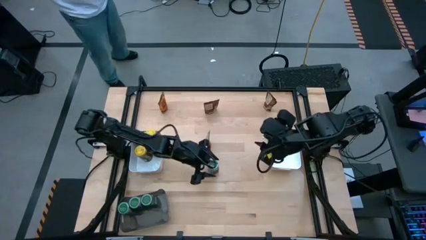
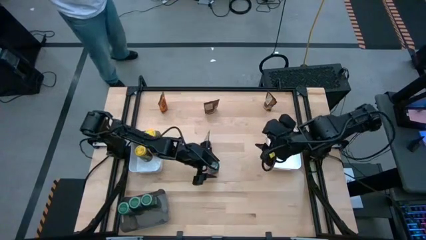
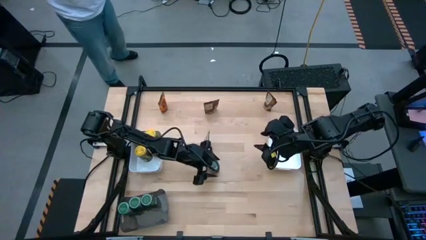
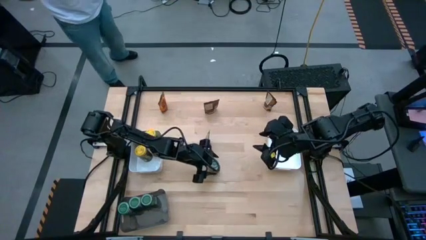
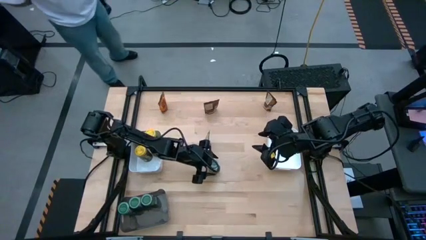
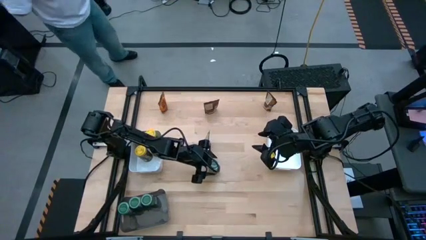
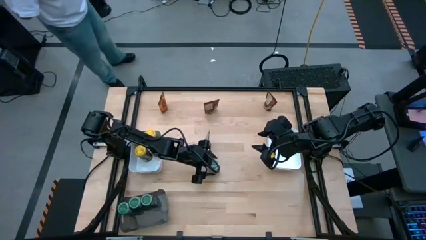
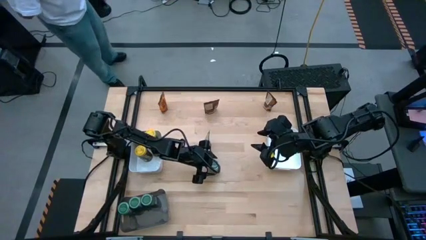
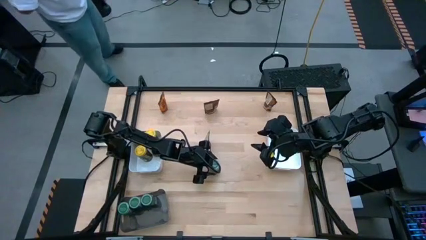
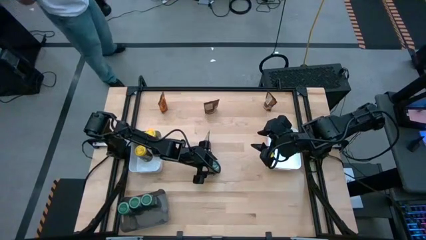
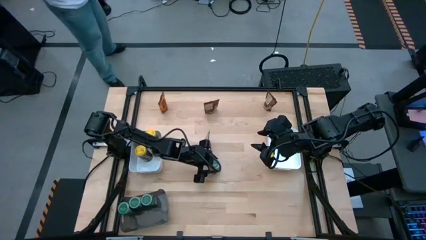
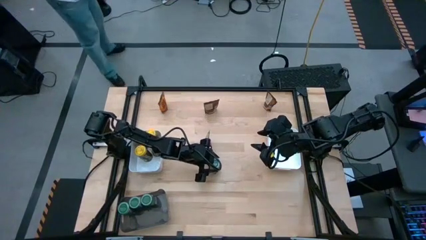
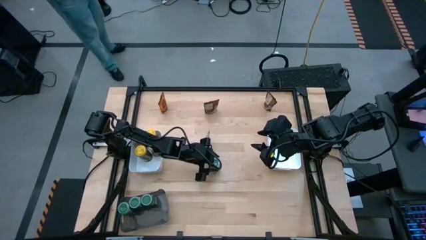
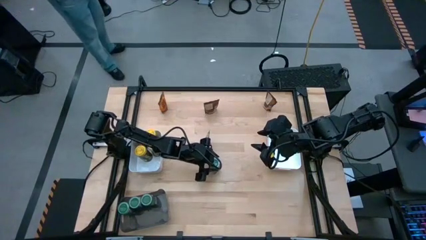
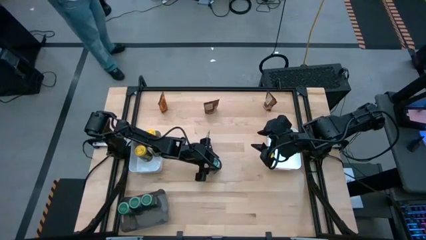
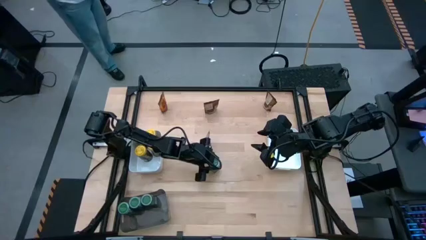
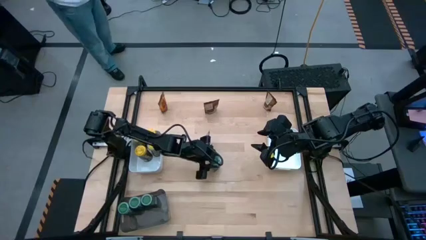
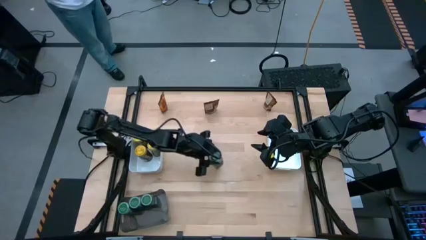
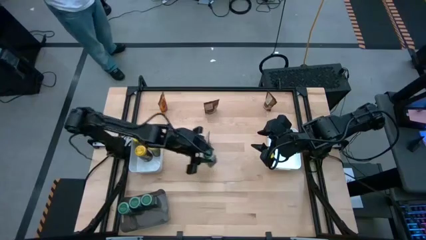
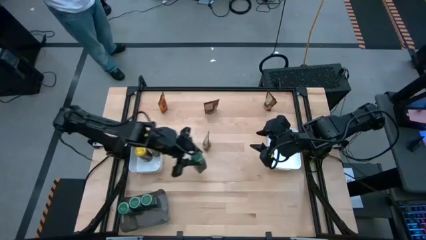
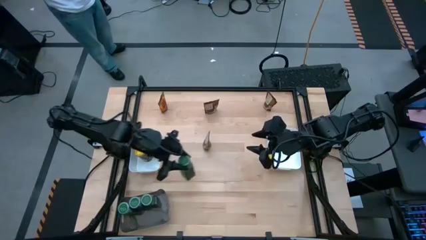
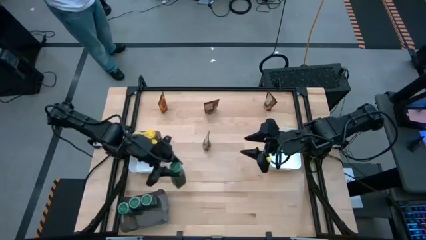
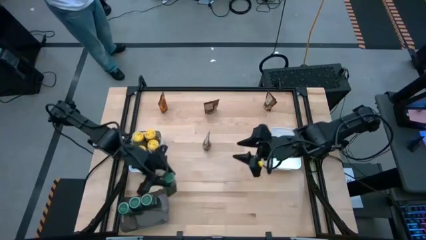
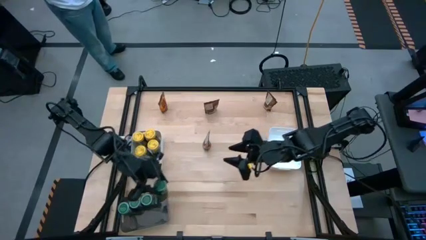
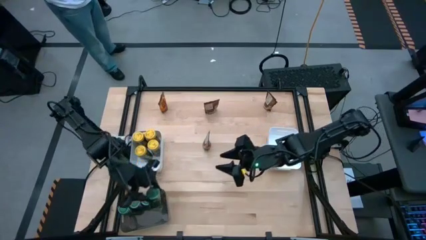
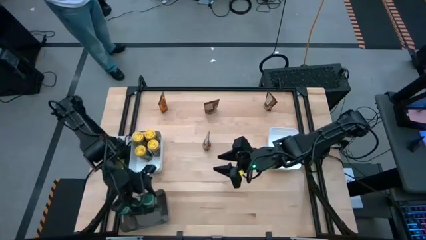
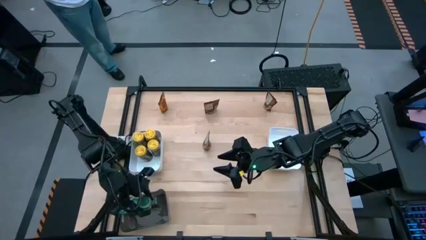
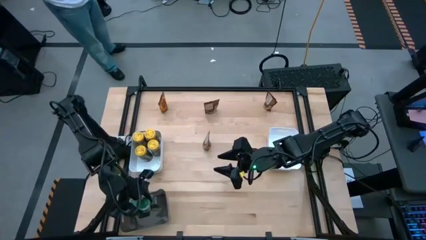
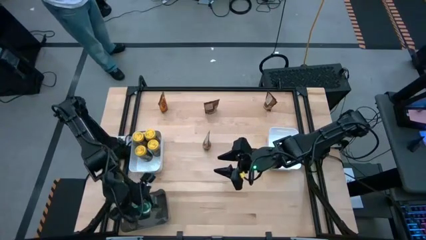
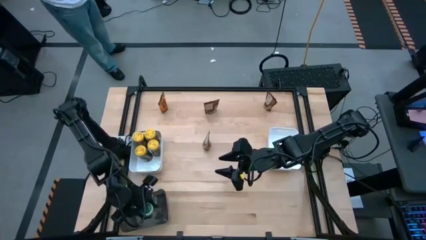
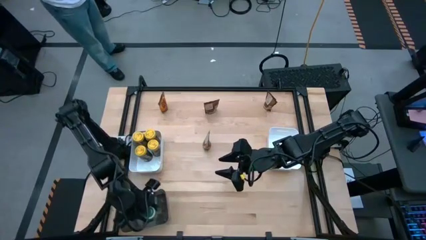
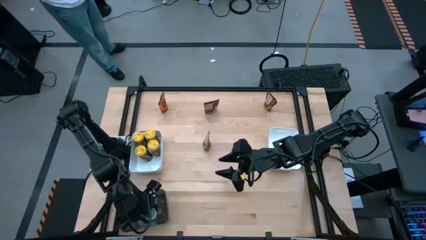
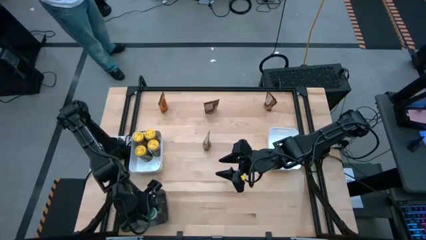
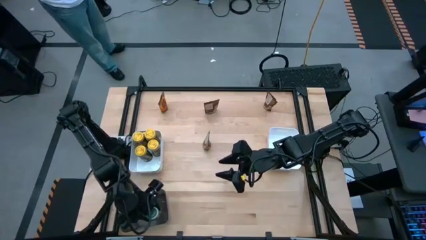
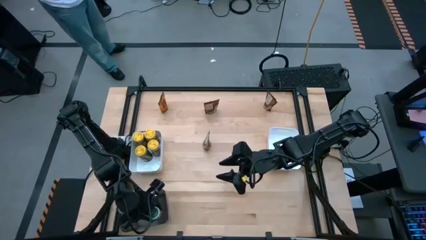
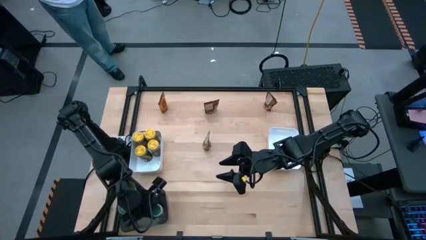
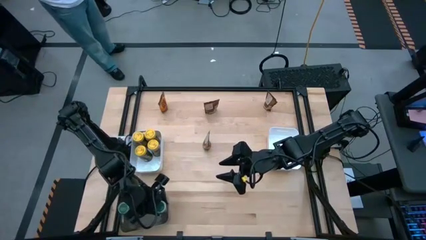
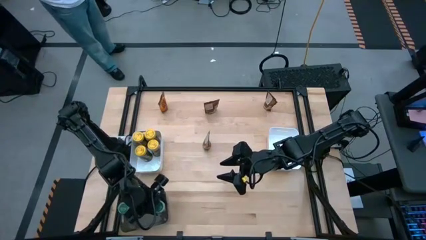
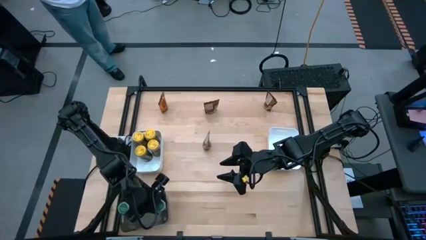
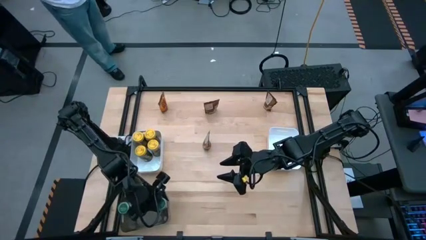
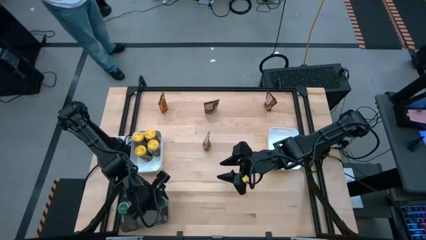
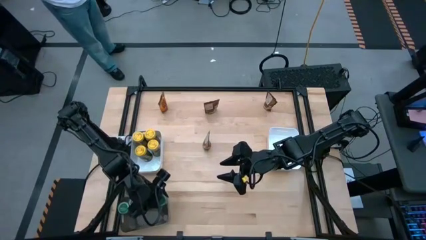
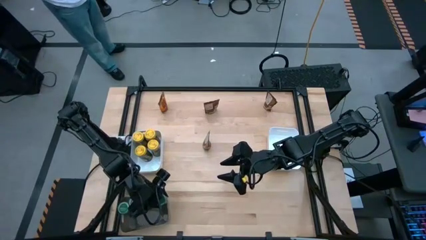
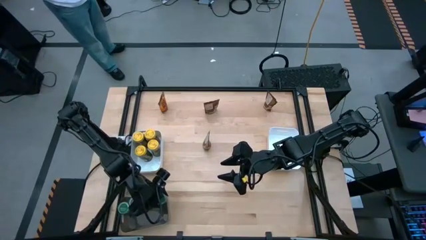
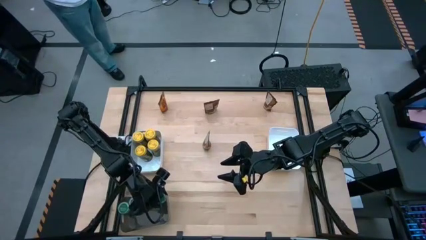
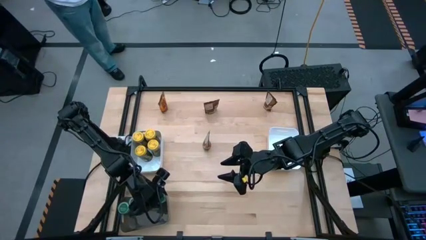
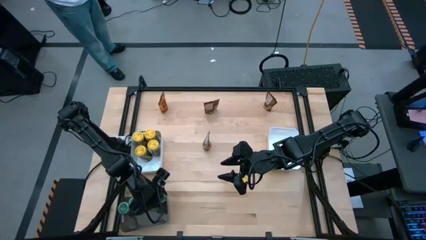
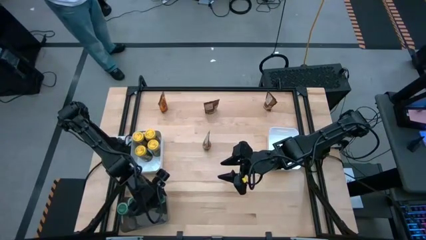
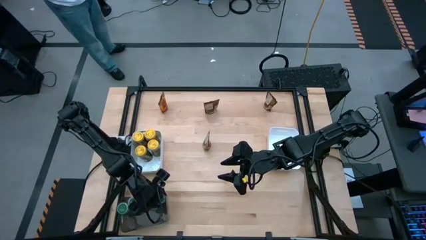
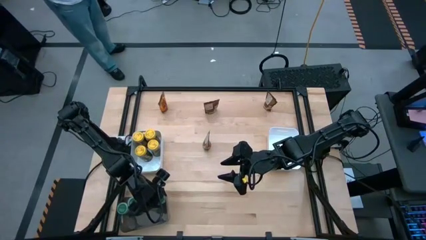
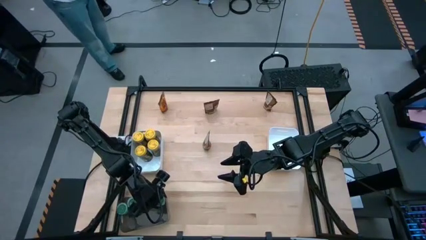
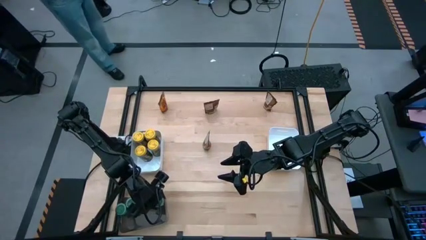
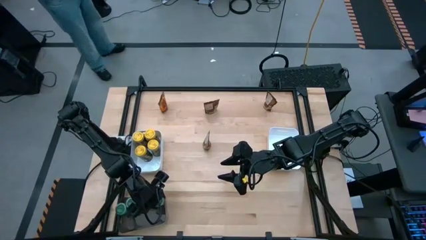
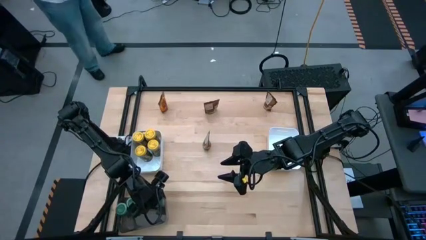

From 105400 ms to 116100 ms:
Task: Sort spices by type
Put the green seasoning bottle into the black bin

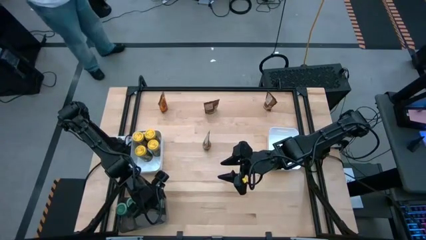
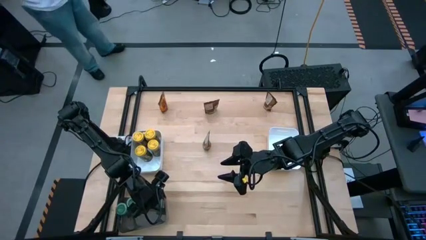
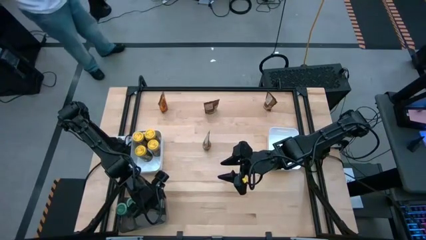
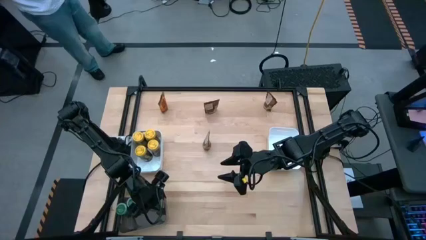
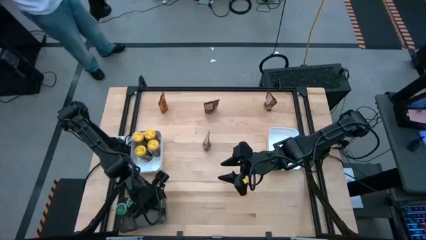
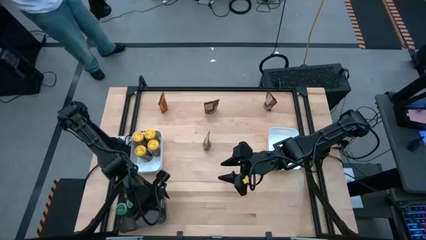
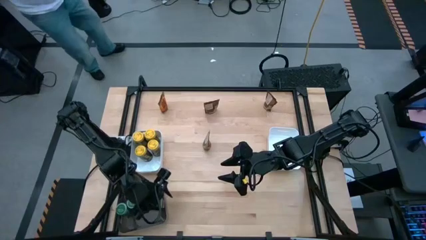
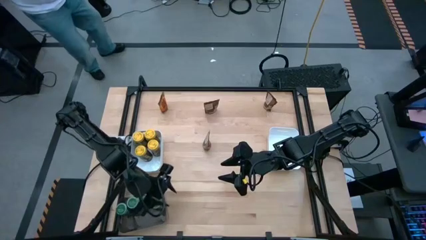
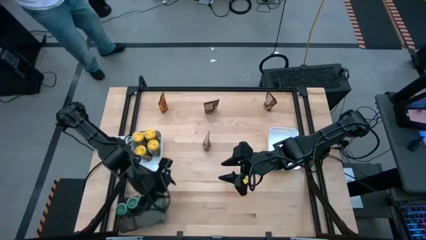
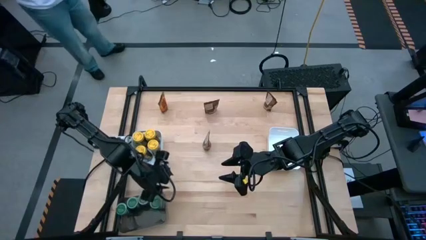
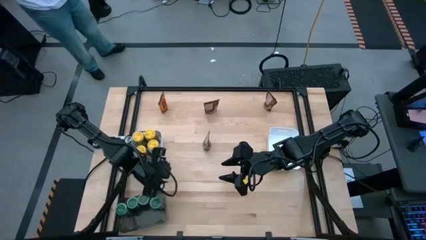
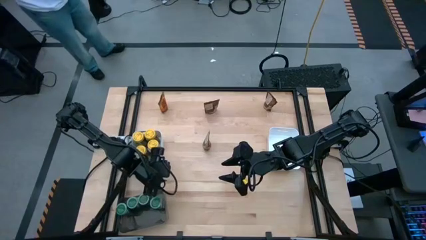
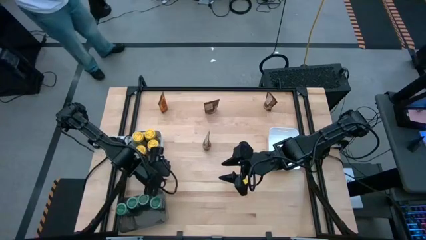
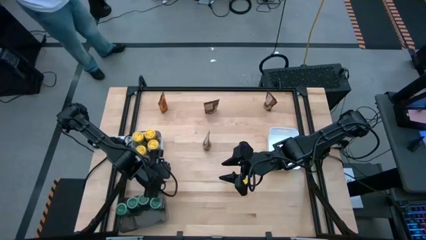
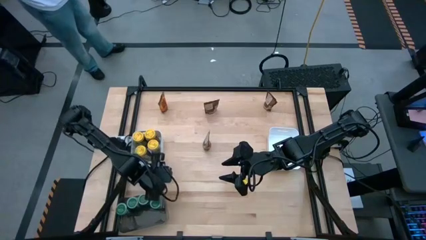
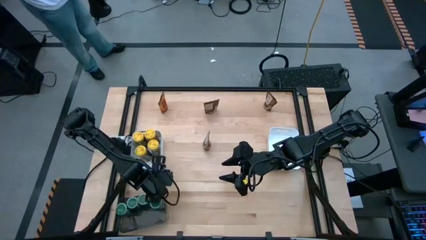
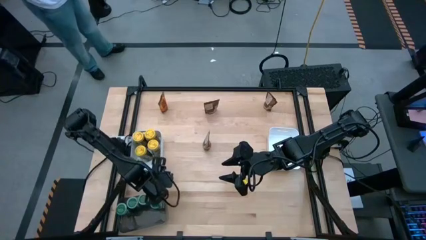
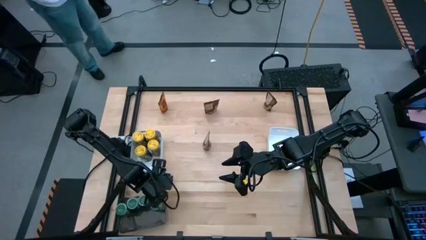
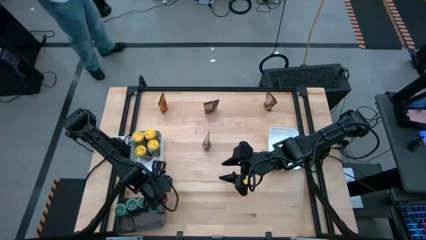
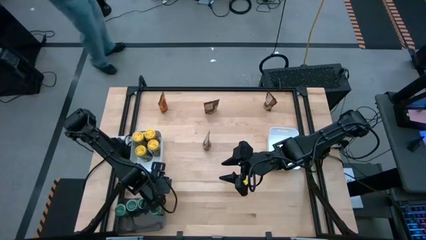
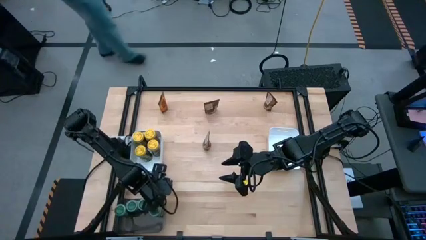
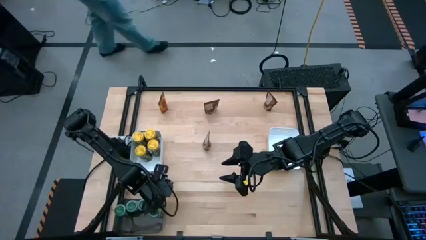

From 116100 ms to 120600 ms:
Adjust the black bin

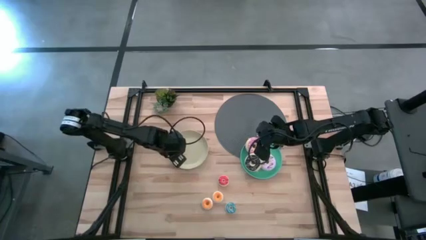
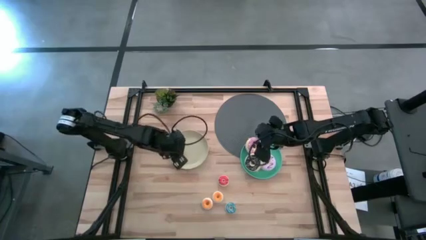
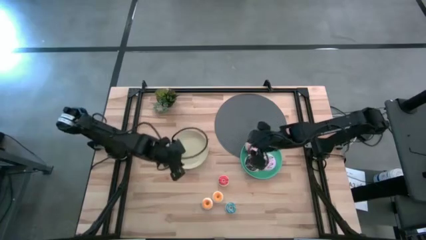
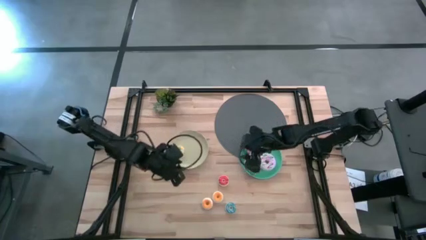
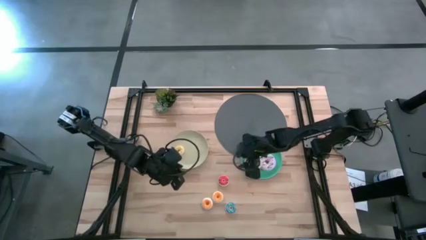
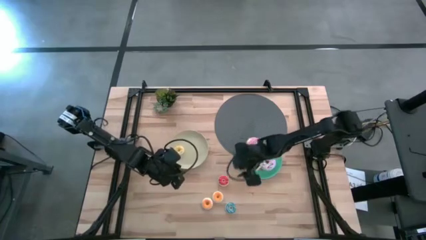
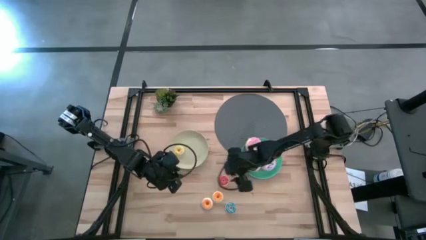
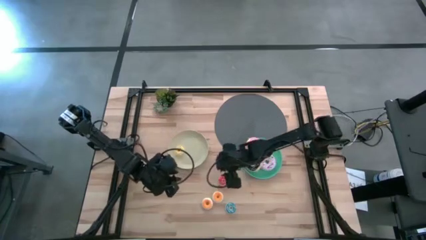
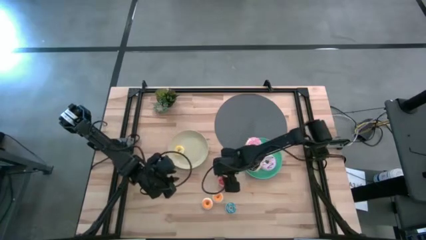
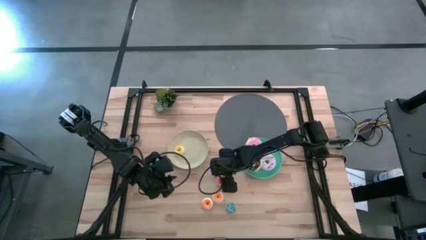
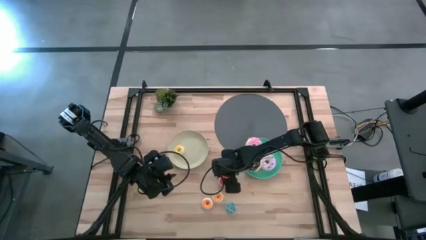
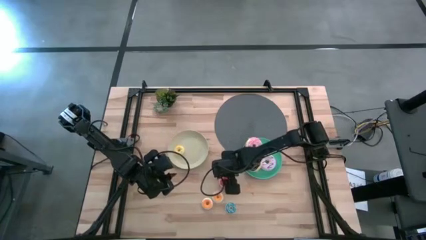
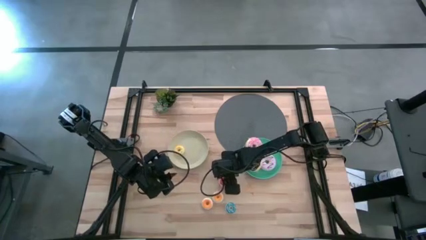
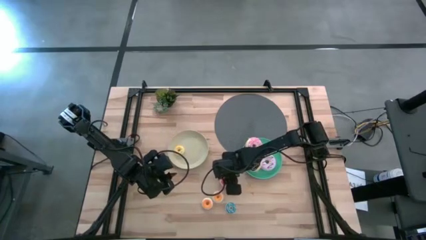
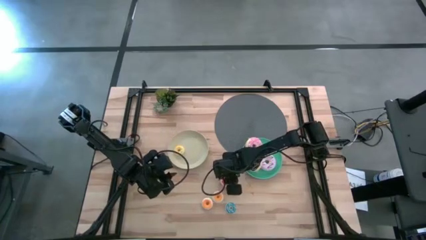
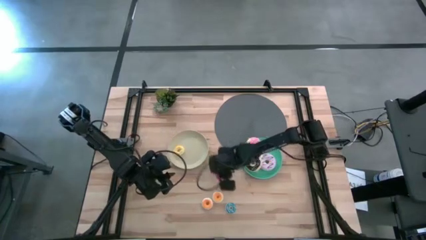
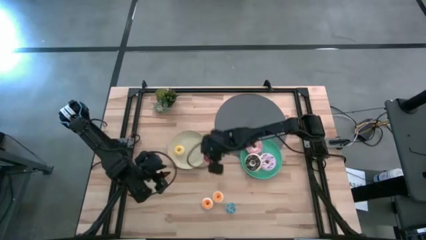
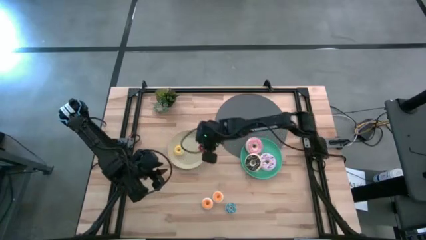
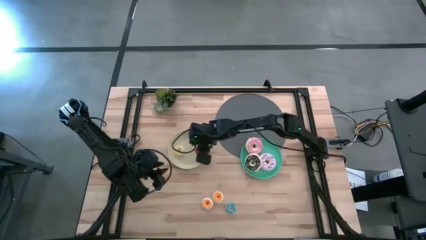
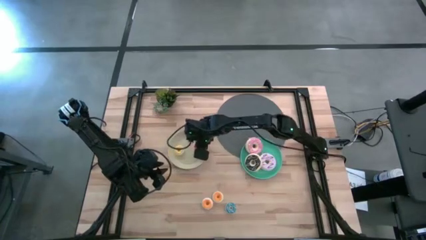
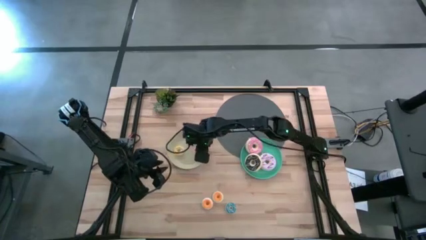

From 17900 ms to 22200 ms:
Task: Pick & Place donuts
Put the top small red donut on the light brown plate
